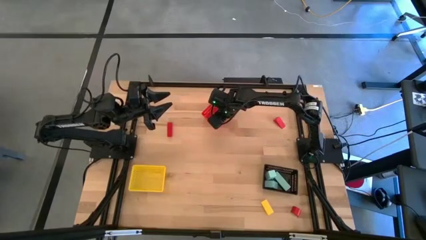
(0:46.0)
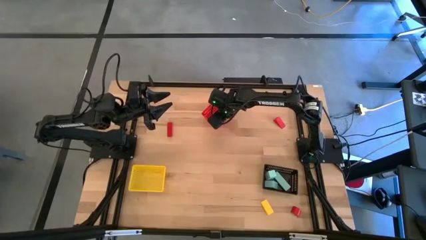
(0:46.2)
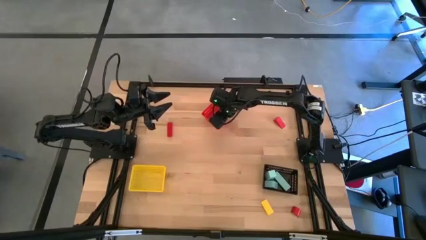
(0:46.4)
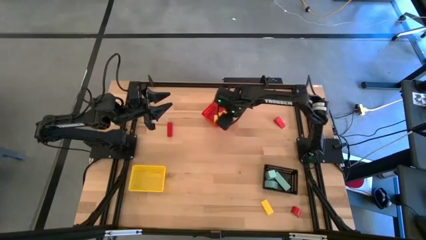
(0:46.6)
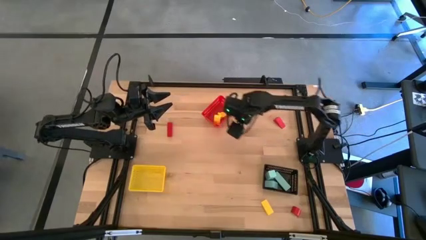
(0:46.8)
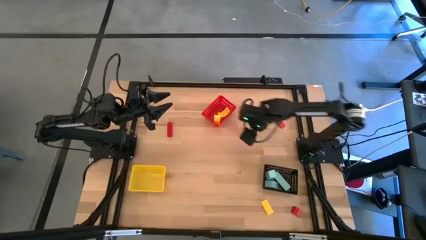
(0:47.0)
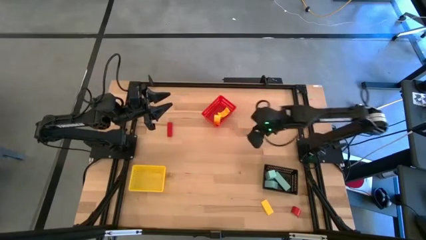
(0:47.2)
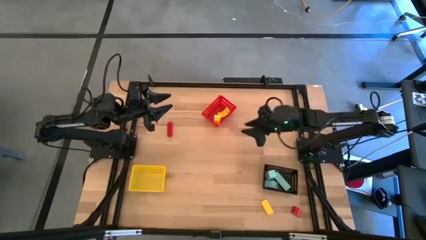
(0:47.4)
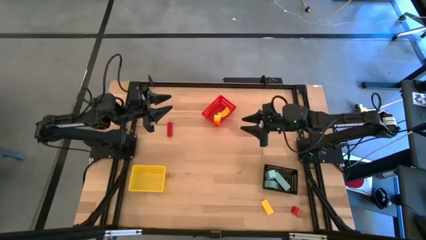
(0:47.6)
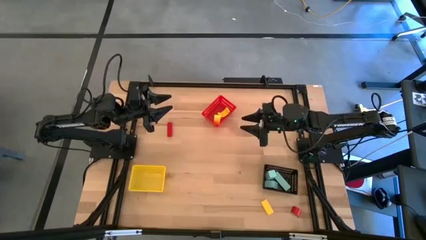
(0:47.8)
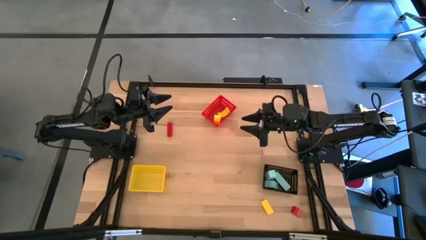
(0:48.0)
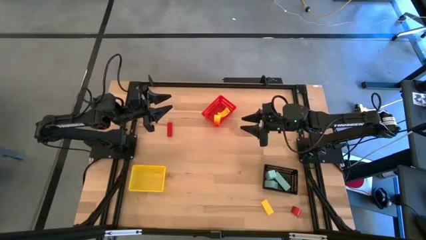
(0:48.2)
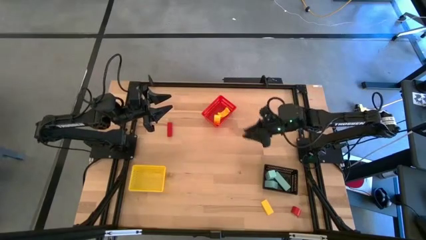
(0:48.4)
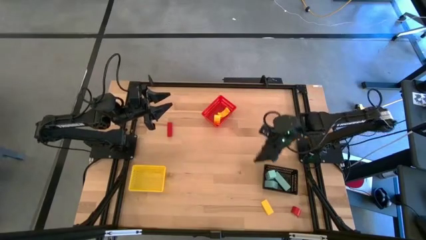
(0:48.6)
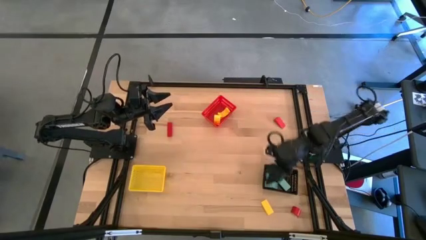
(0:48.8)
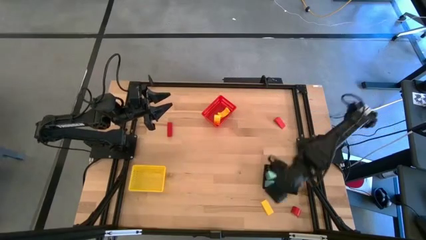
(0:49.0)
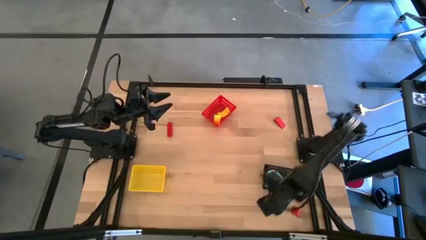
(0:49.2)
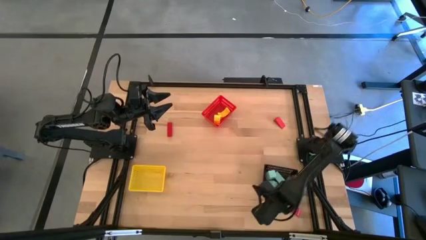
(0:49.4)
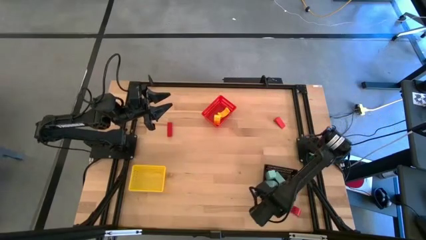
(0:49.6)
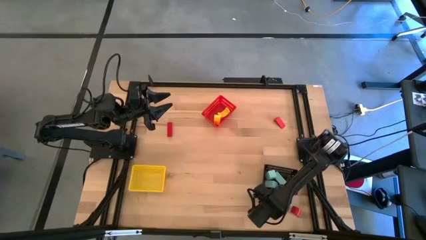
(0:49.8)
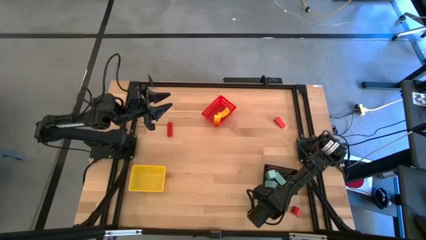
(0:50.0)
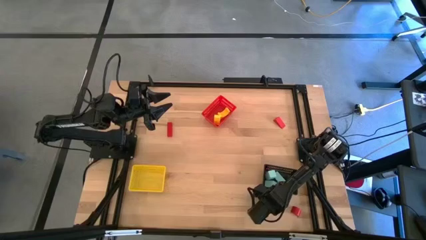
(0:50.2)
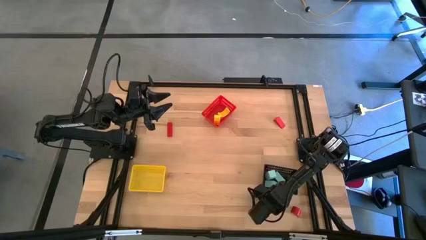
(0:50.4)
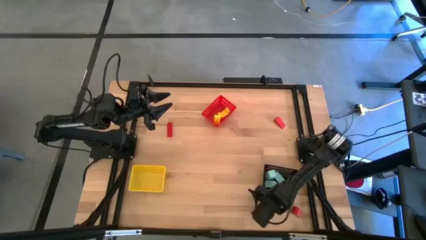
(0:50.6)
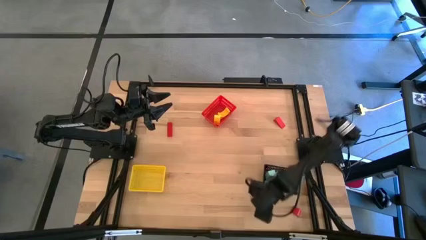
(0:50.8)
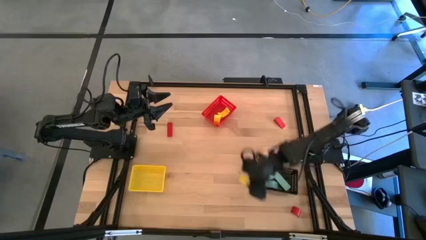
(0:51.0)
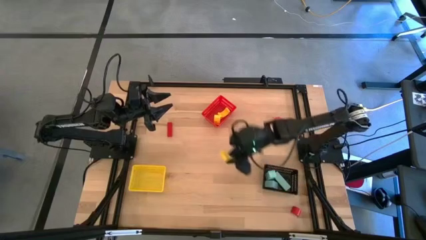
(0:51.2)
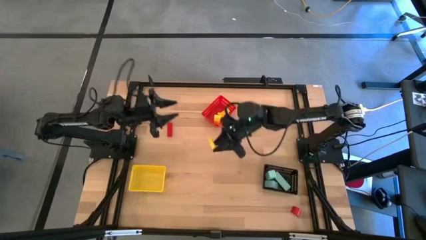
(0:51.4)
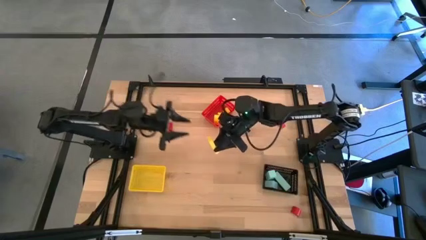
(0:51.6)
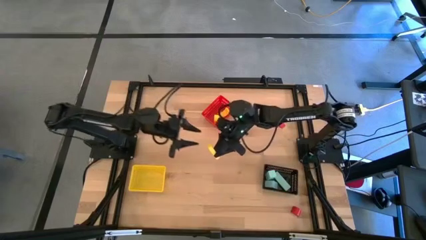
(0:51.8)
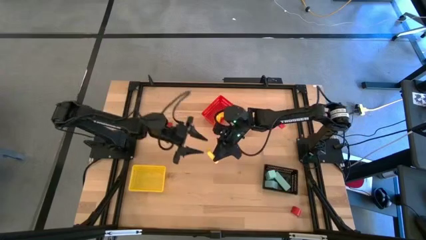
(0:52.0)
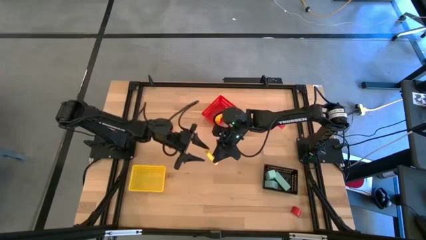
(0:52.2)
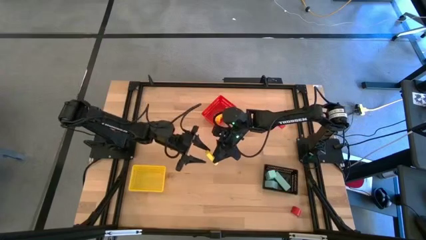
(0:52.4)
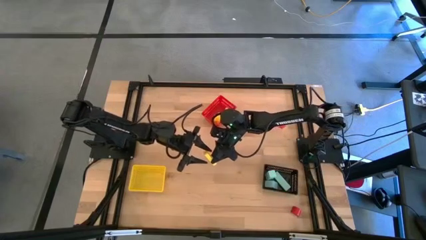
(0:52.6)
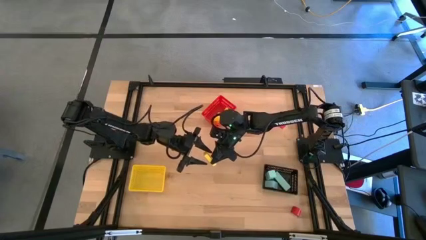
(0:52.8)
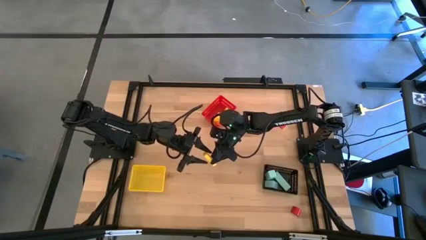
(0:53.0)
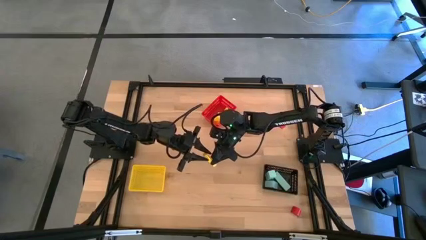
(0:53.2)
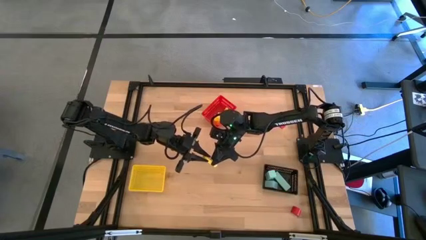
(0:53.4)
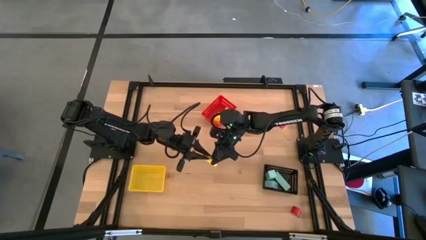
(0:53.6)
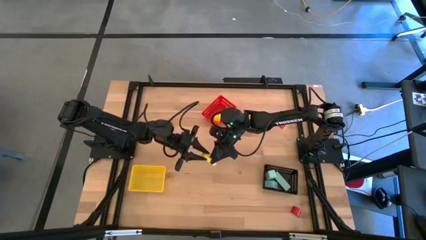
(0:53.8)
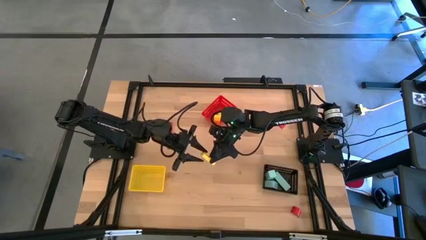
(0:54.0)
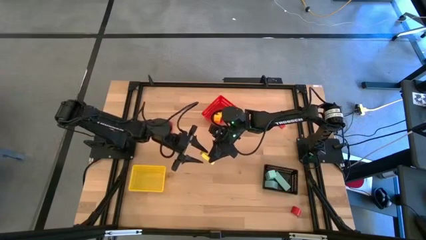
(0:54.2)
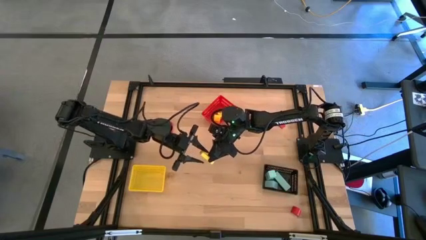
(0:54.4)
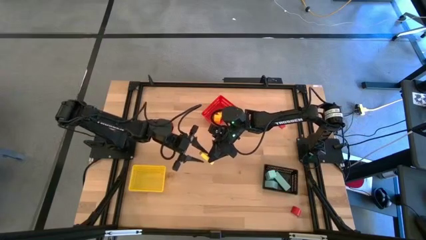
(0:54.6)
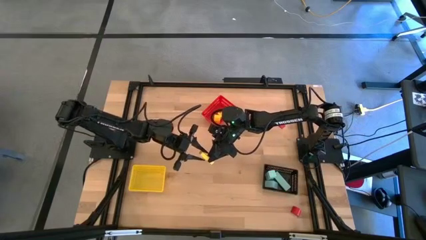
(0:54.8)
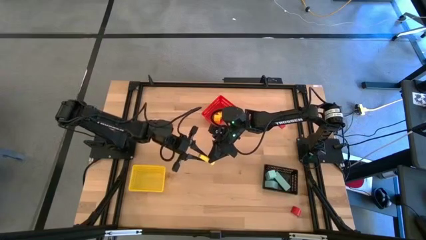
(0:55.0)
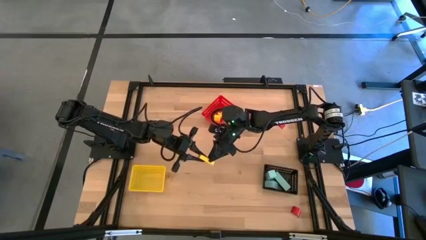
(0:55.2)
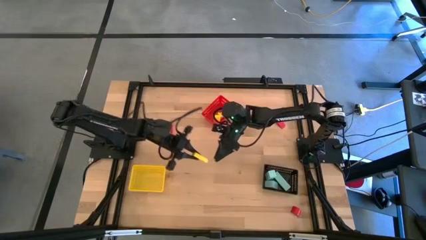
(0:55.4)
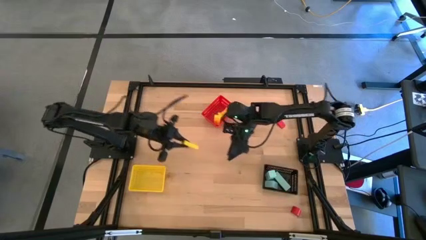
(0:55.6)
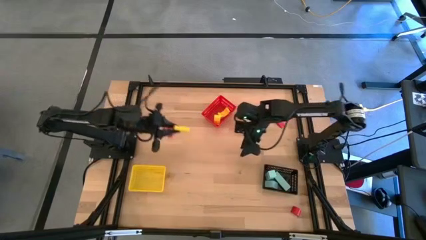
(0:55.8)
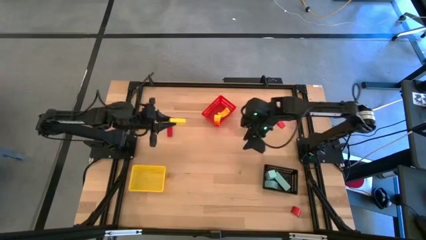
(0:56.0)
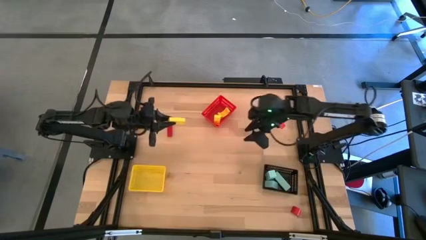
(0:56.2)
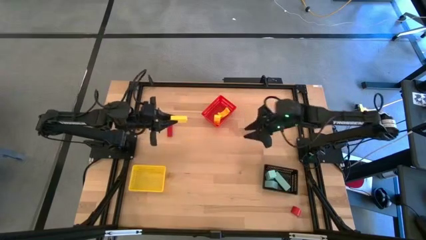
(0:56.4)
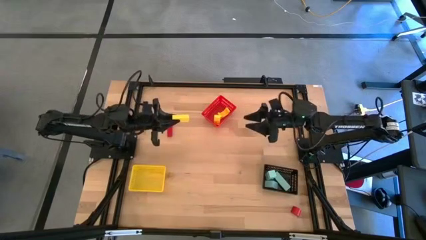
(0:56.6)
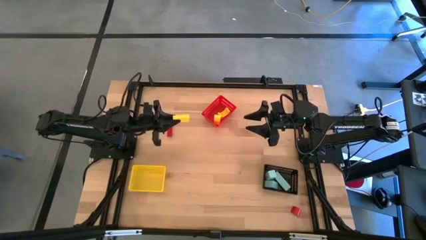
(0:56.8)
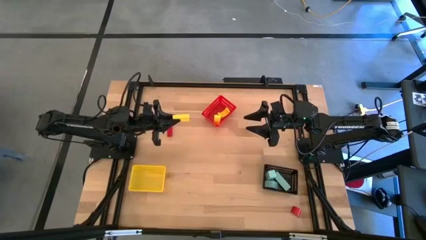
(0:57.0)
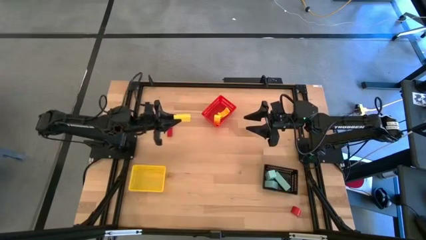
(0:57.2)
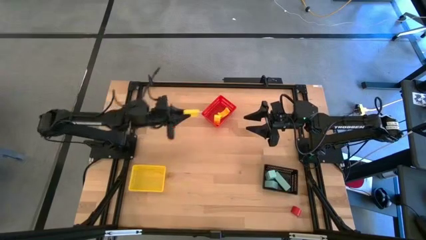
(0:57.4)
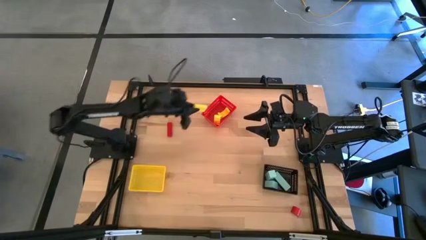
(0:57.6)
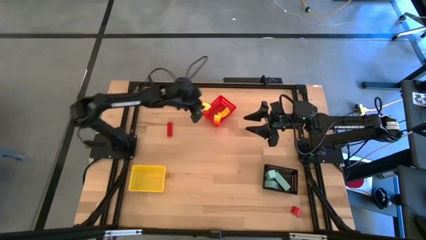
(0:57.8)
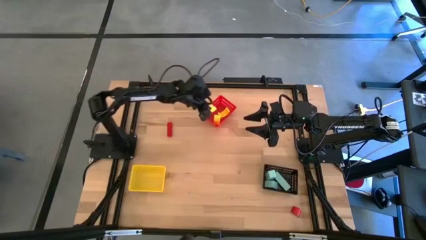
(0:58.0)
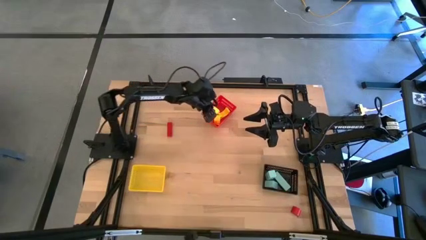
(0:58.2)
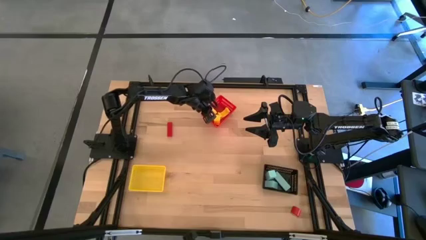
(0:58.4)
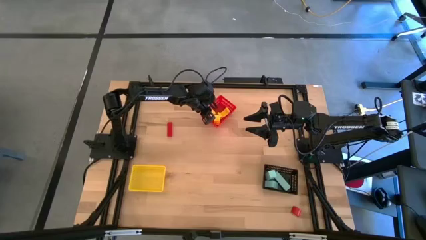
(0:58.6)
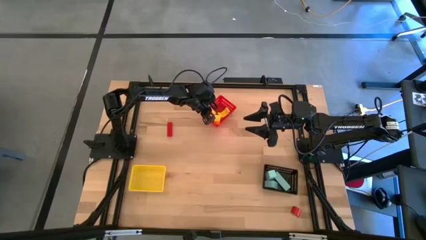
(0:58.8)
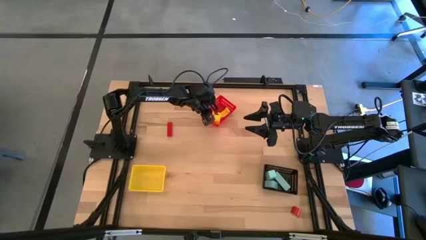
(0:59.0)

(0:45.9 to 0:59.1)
Task: Sort & place blocks by color
Put the yellow block into the red bin

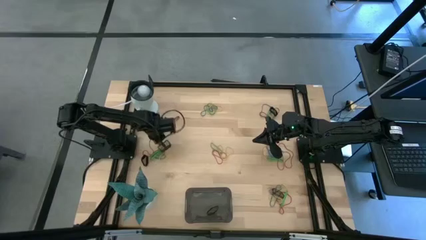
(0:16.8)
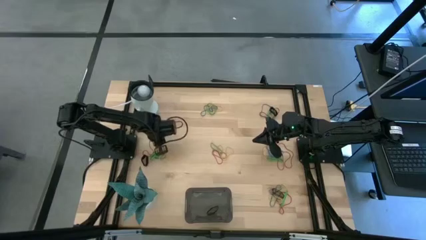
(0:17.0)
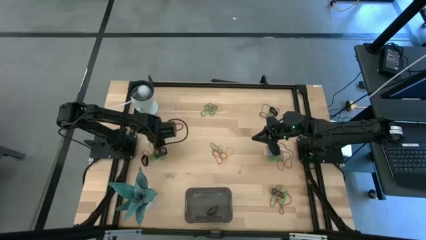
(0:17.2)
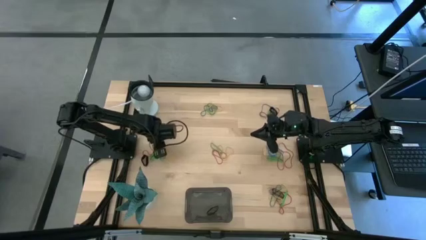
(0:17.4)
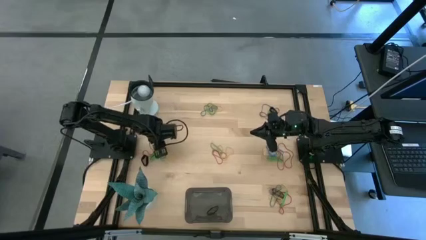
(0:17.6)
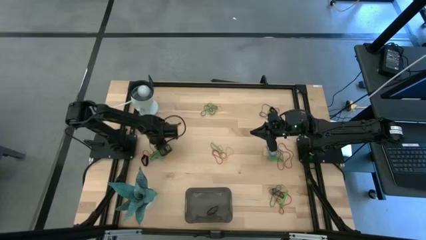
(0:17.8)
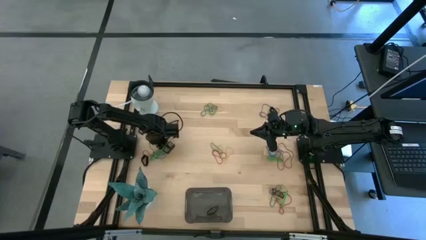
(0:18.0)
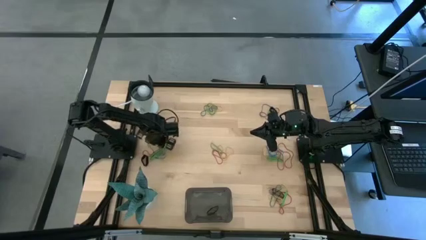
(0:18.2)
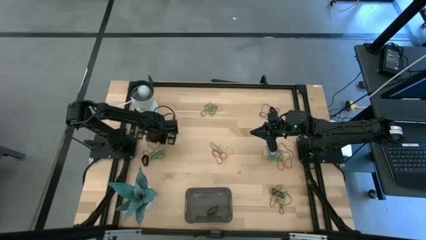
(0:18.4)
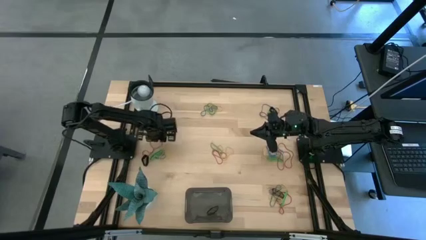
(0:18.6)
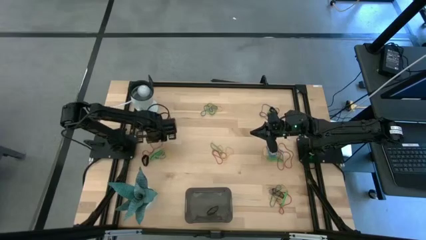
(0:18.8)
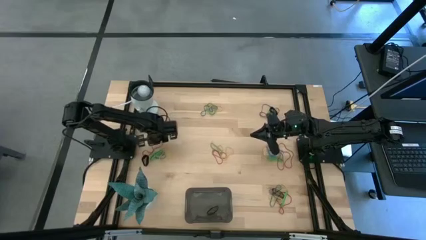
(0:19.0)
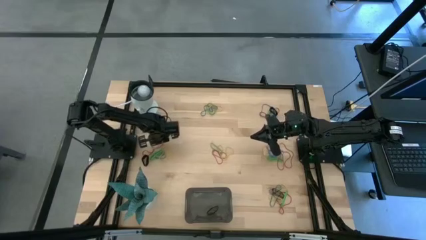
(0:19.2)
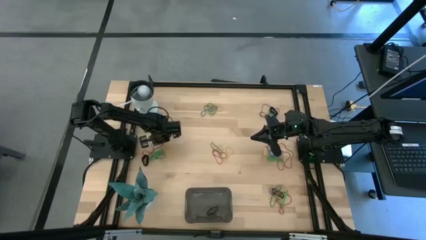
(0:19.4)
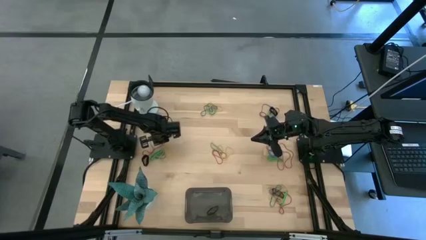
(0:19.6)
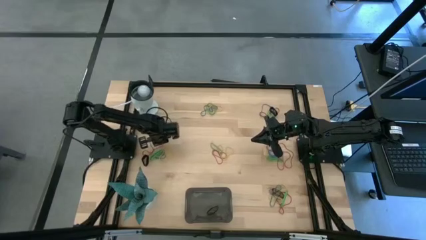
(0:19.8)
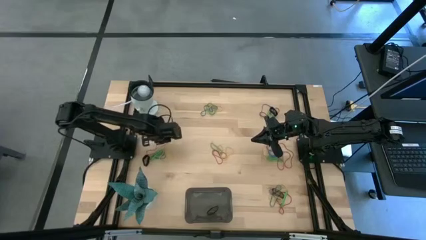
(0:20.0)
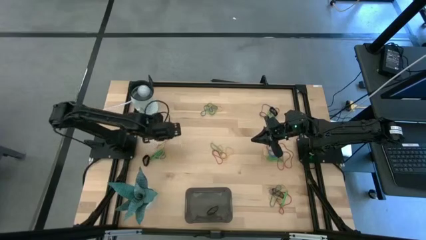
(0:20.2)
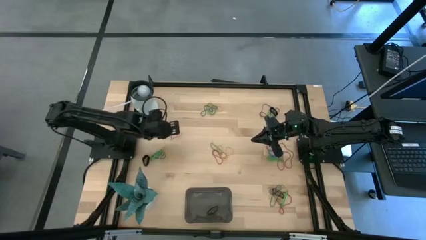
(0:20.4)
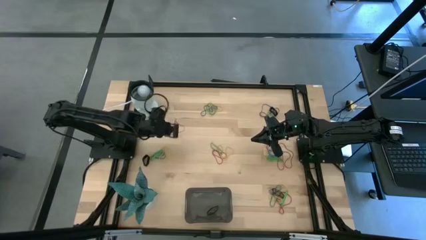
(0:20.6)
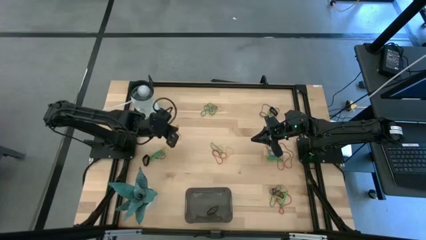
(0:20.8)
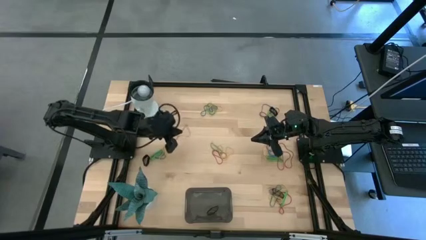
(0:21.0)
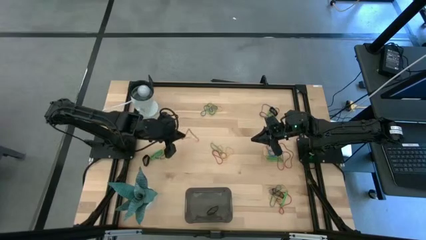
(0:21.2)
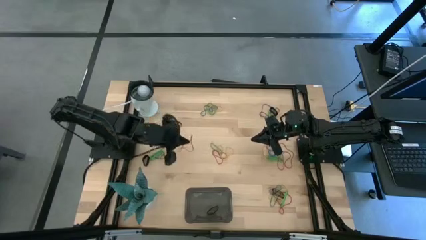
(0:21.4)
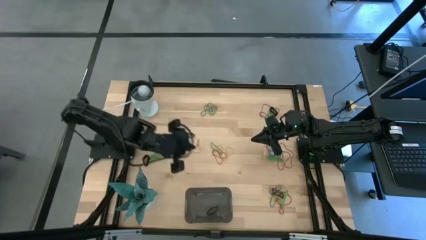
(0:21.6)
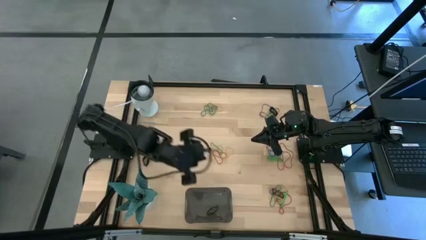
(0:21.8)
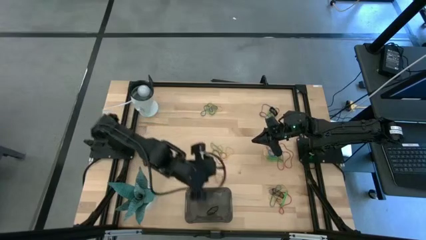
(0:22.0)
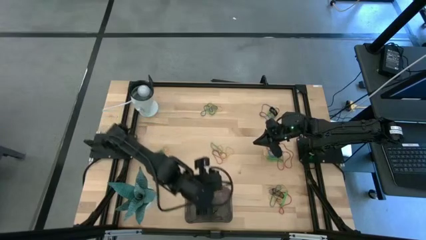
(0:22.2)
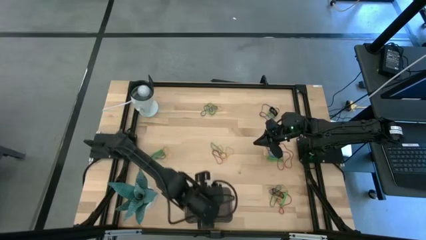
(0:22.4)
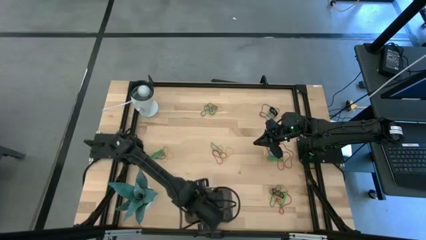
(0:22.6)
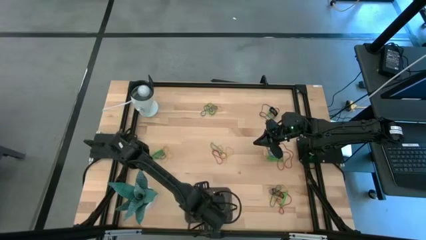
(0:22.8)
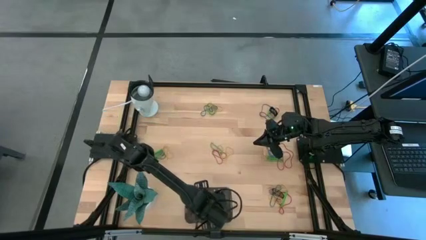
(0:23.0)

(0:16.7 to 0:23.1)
Task: Pick and place rubber bands into bin
Put the red rubber band into the black bin
